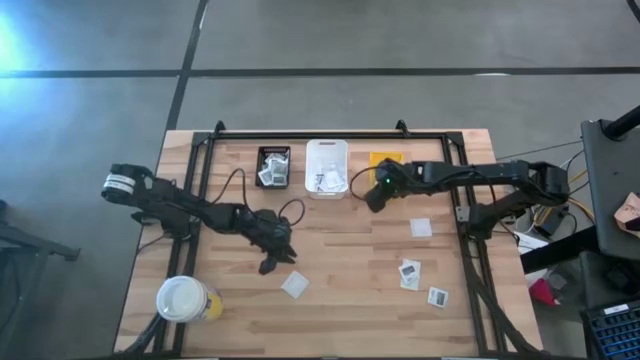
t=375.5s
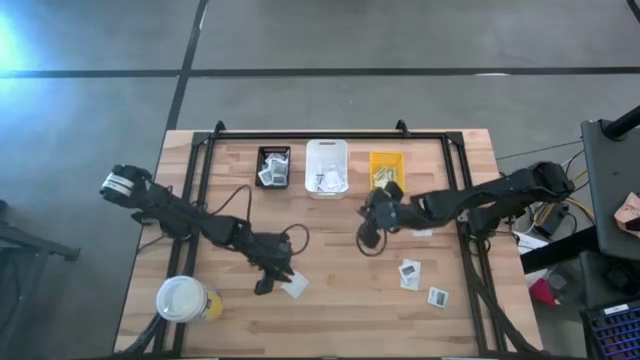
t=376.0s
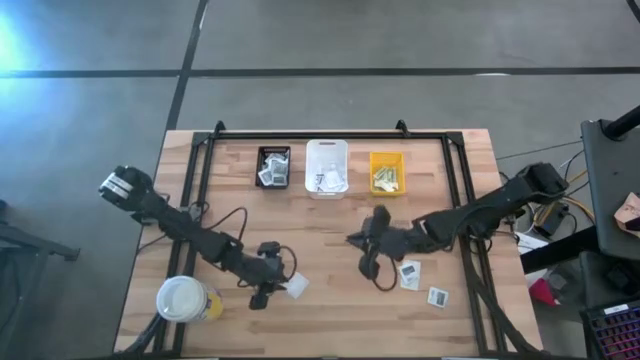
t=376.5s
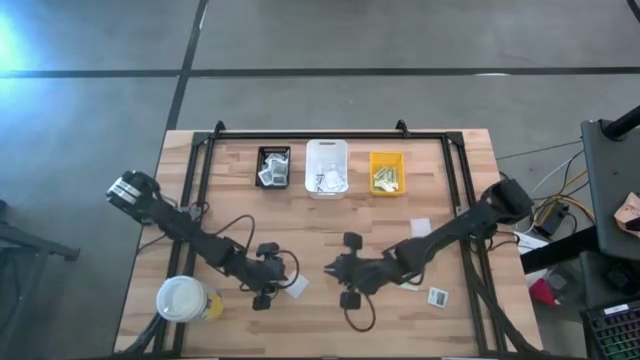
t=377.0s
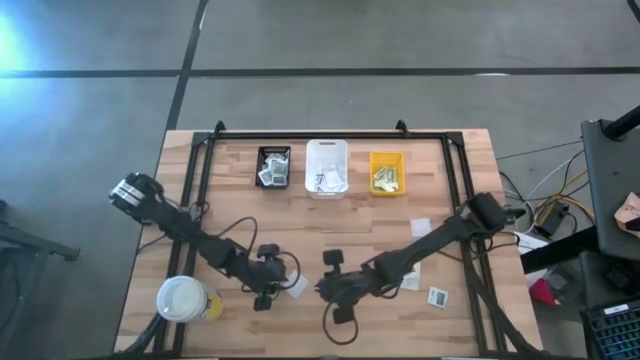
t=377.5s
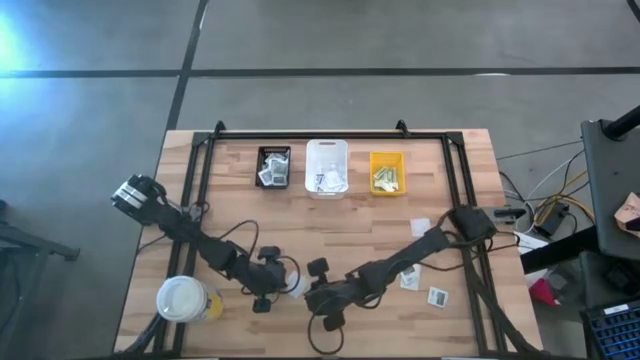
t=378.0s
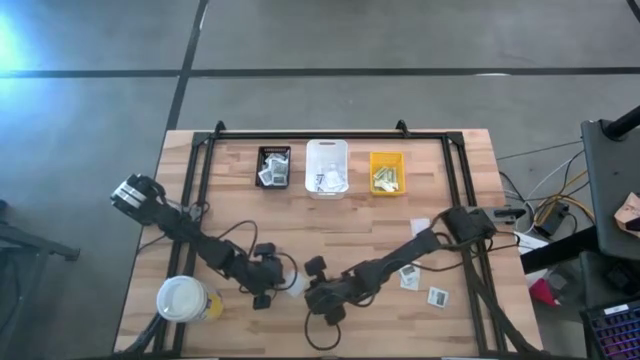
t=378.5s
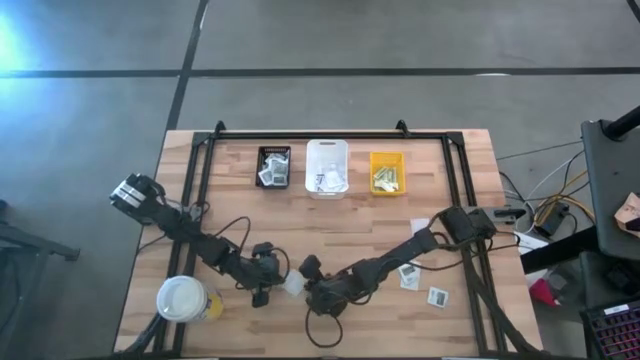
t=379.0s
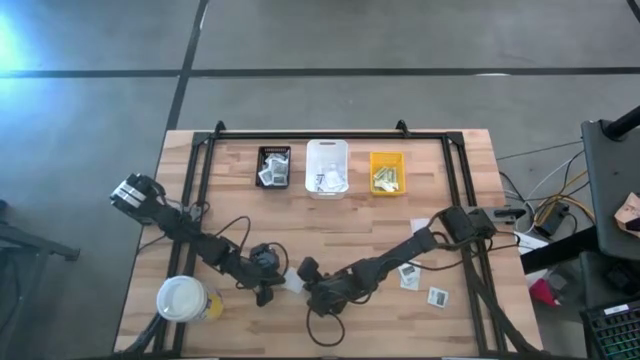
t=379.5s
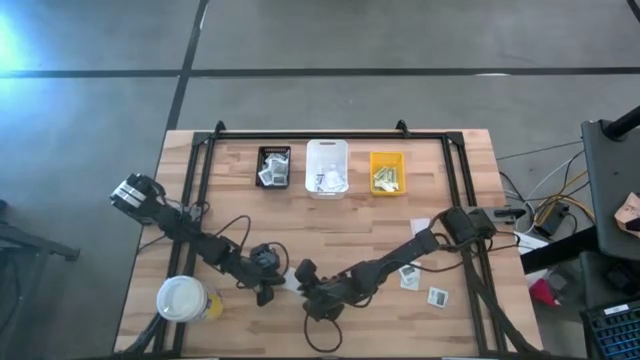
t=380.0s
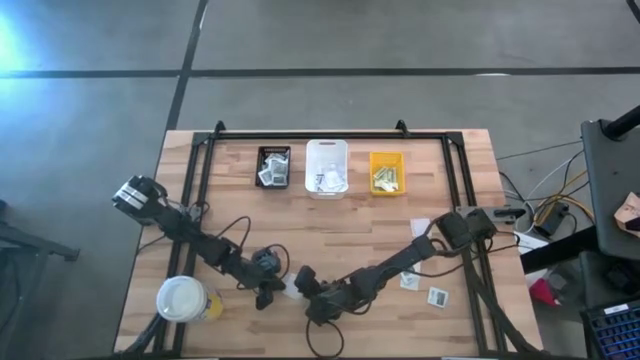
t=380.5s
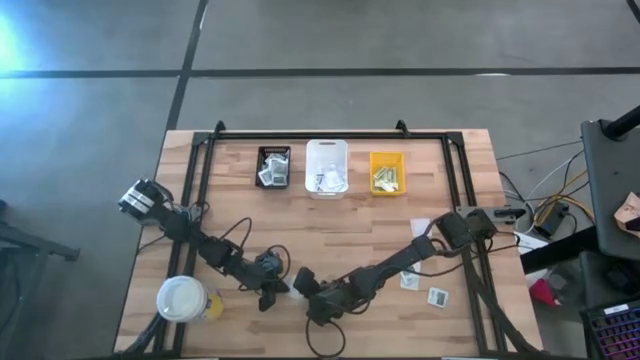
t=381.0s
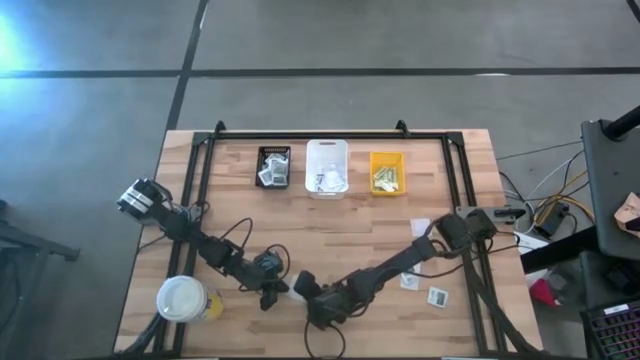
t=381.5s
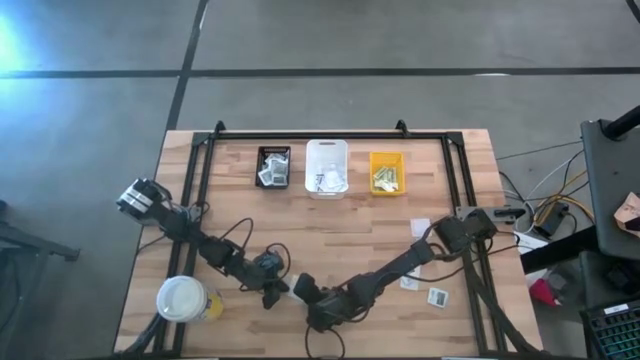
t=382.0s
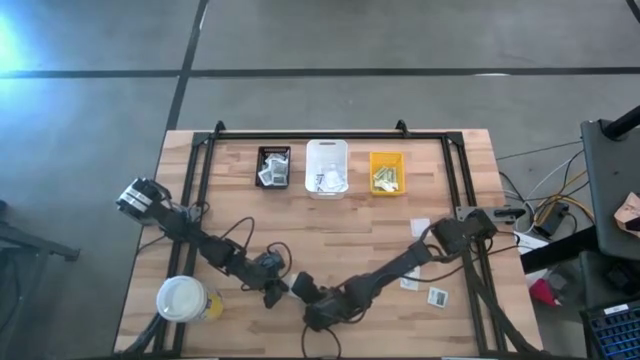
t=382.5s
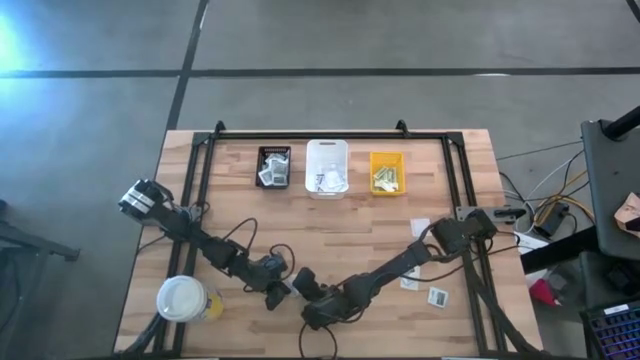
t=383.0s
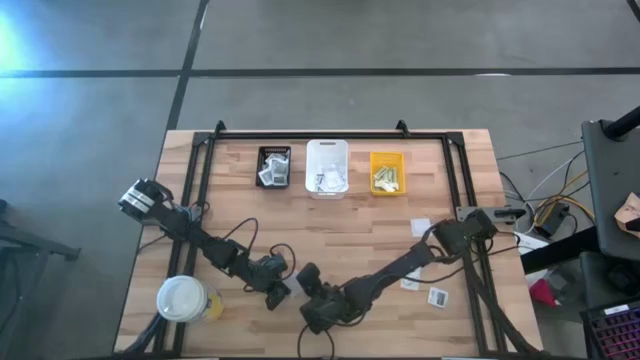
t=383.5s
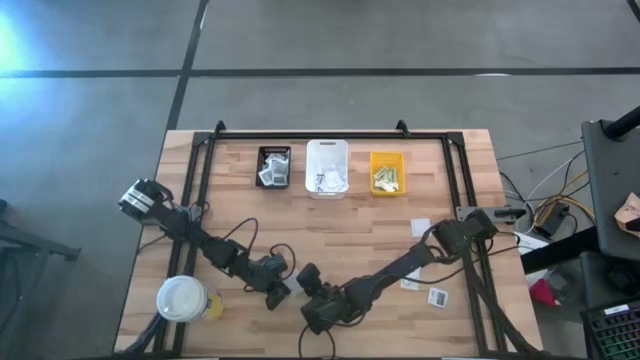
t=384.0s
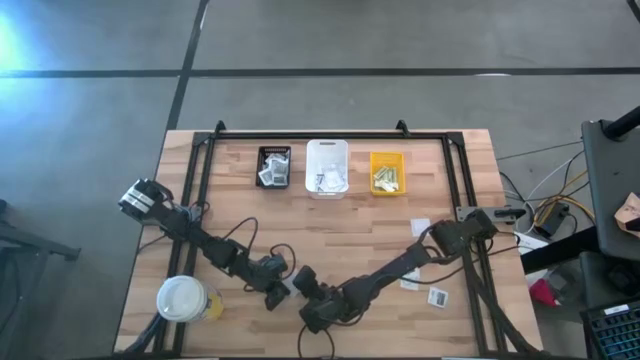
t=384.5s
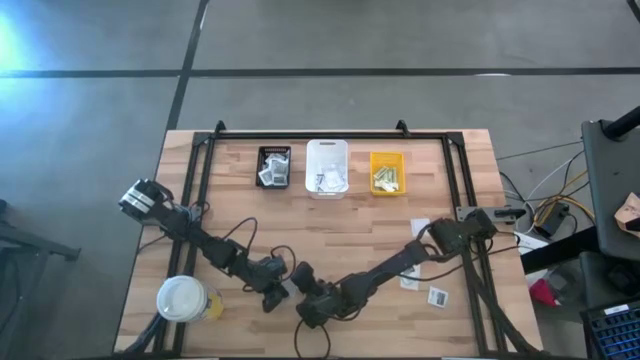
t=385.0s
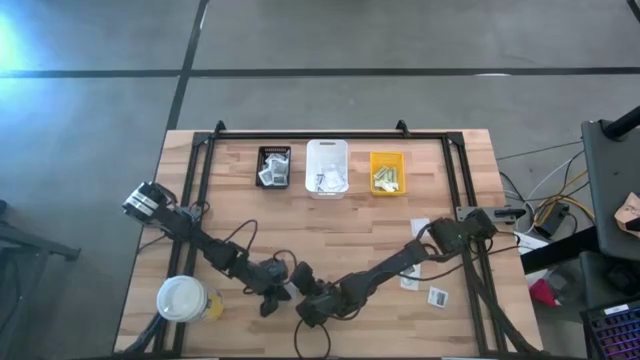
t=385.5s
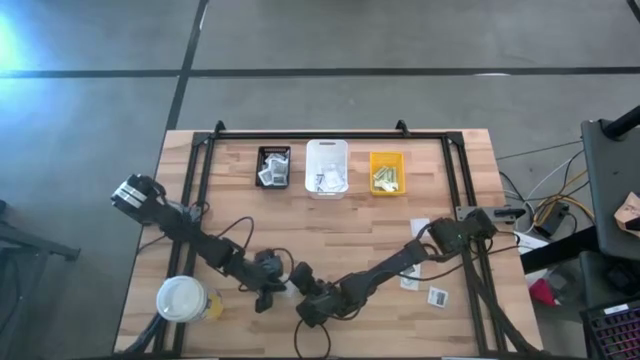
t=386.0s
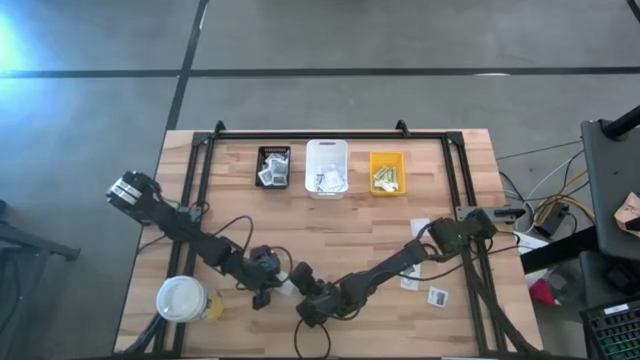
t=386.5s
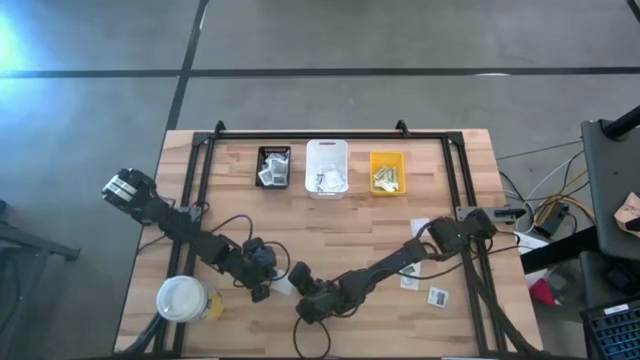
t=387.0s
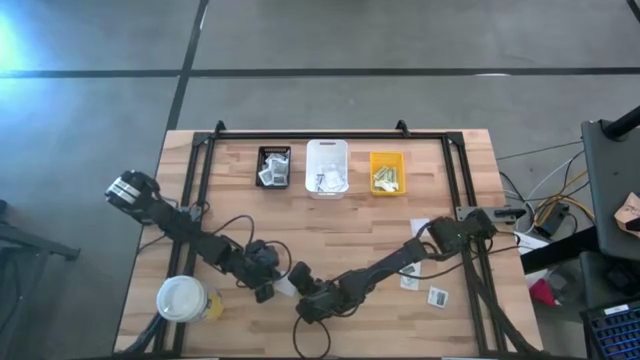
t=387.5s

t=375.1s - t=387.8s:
Task: Pick & Place First Aid Supplies
Put the blue bandage into the white bin

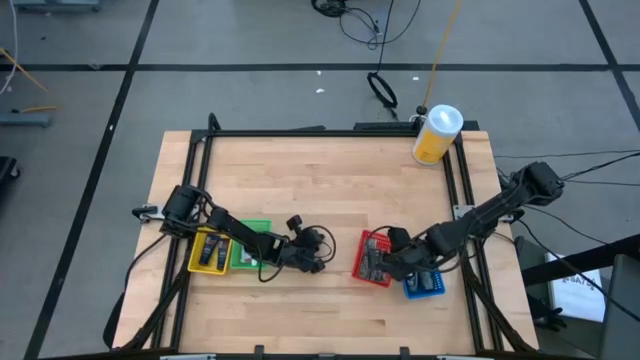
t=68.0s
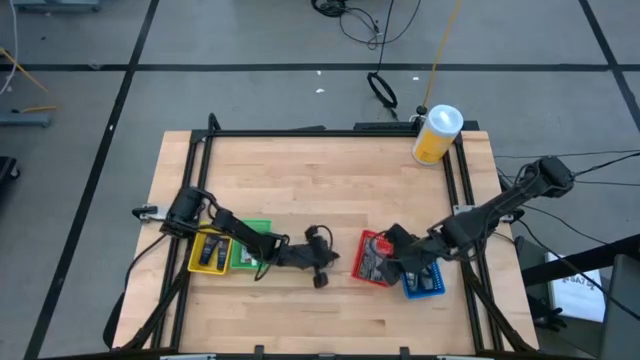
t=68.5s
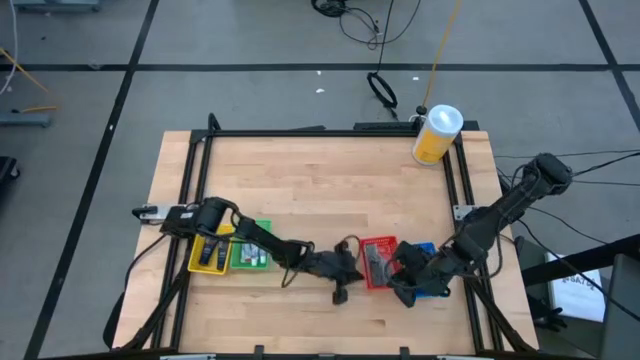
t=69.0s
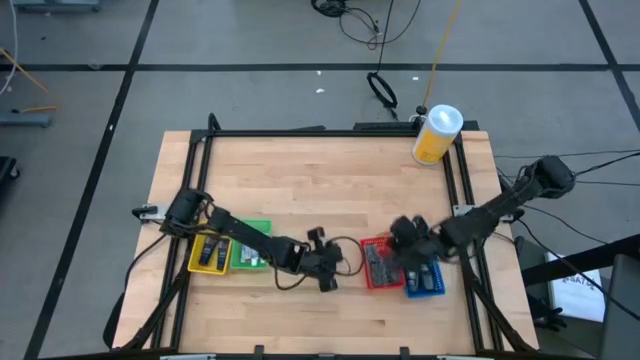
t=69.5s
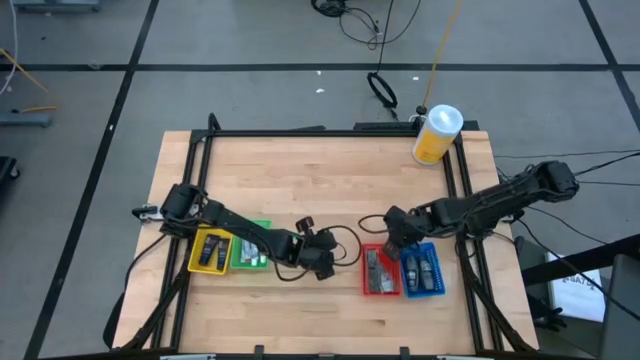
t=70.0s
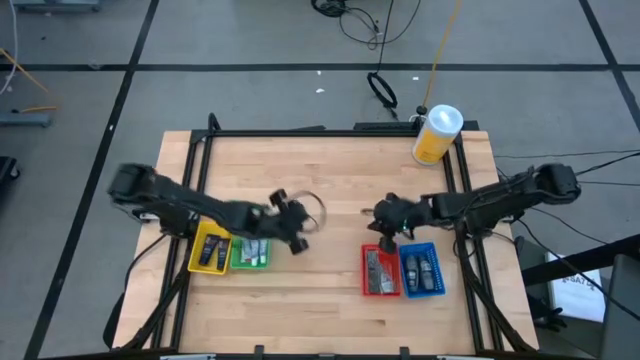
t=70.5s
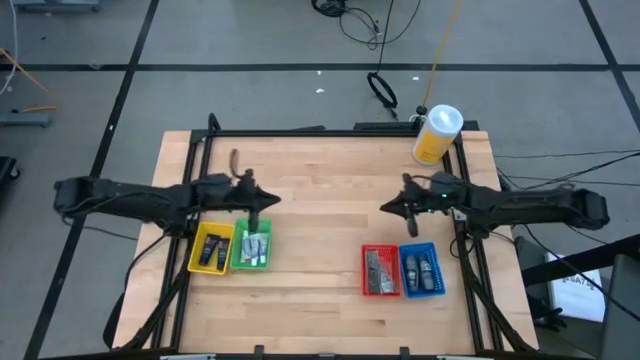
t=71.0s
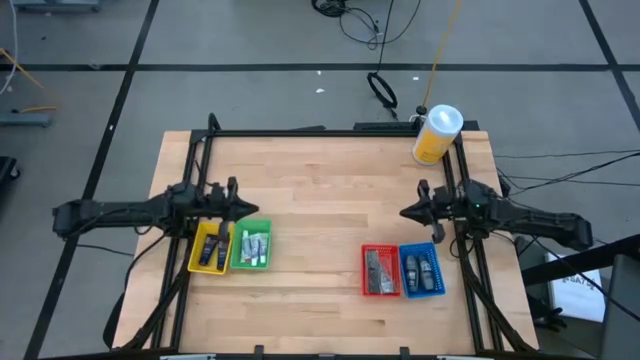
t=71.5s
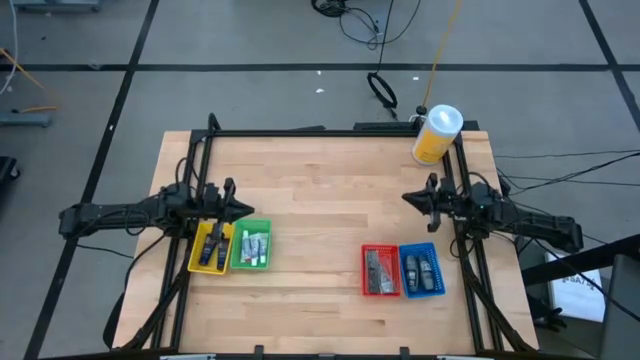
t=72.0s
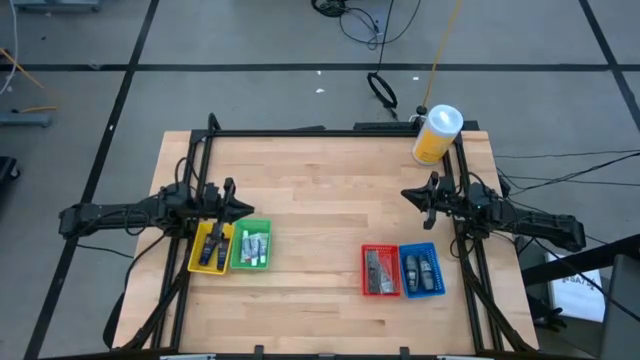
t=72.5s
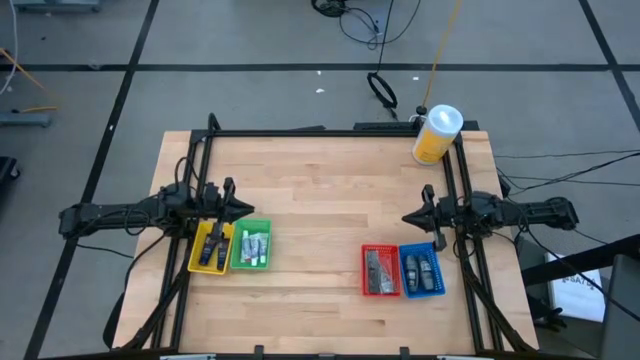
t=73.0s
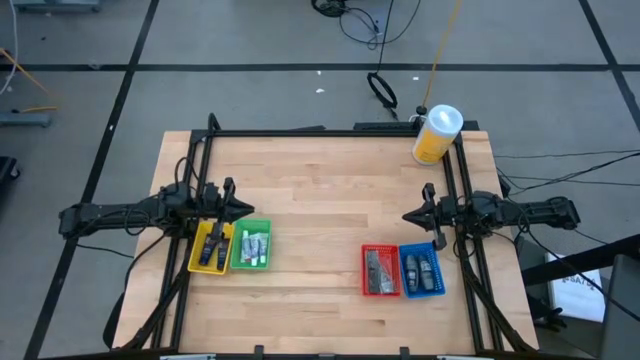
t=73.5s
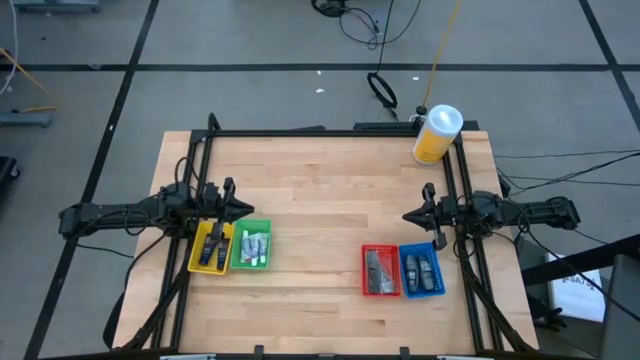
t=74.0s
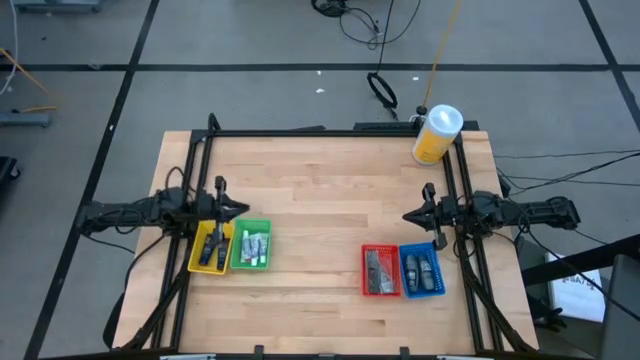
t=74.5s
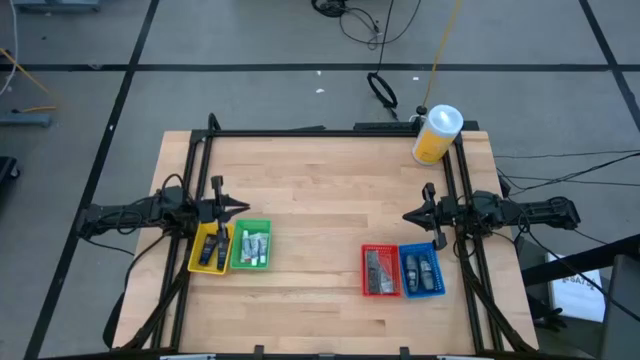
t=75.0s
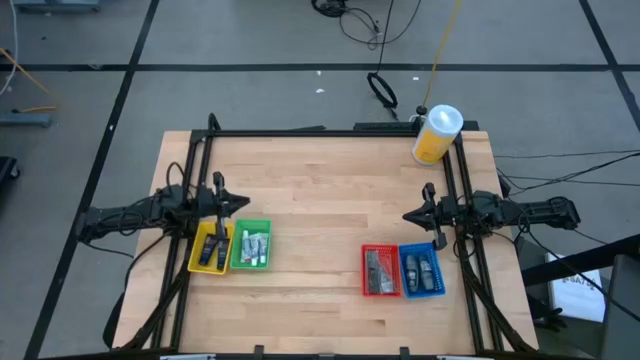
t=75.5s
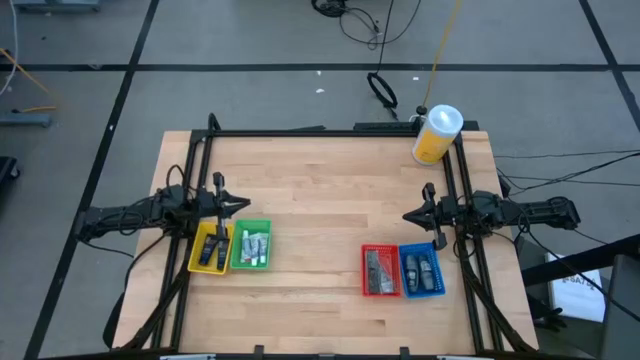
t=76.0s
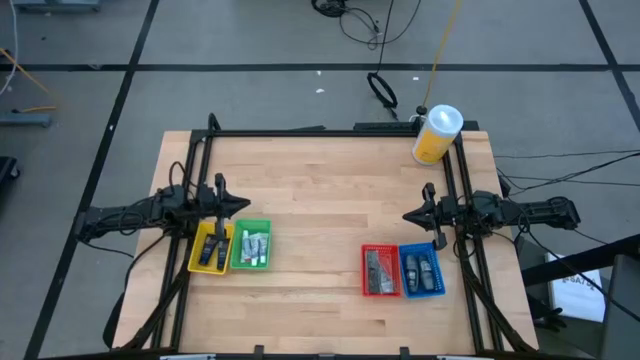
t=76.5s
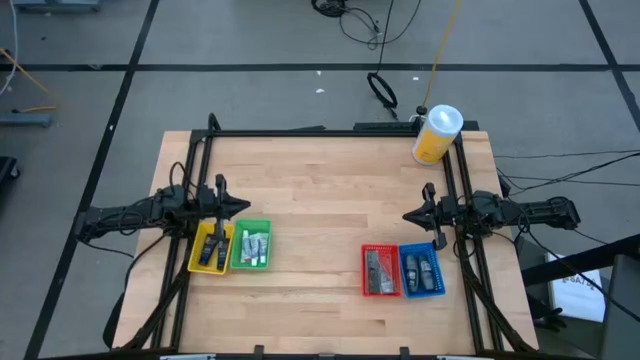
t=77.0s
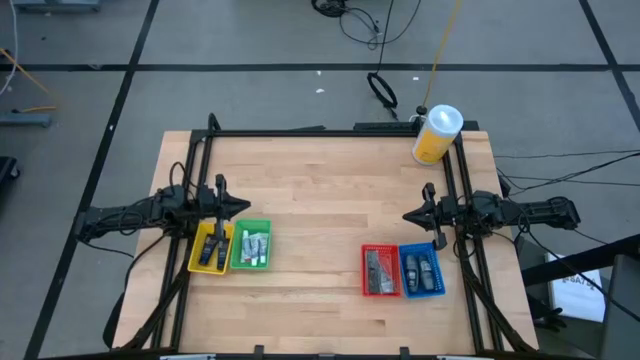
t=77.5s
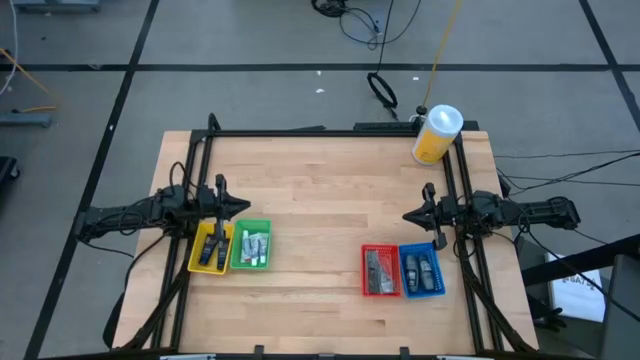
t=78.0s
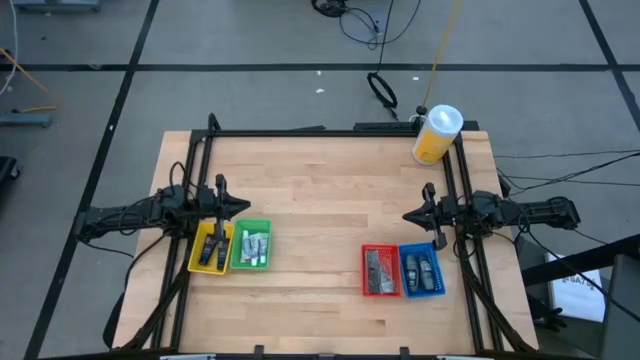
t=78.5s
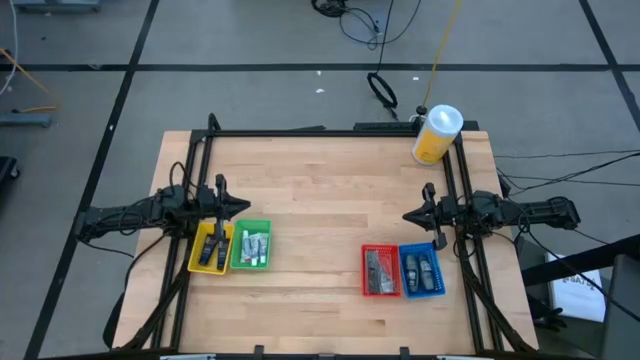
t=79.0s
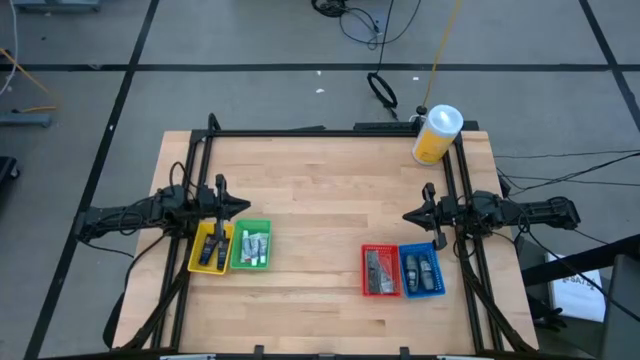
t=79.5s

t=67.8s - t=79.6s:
Task: Pick & Place Travel size toiletries
Return to Home Position
